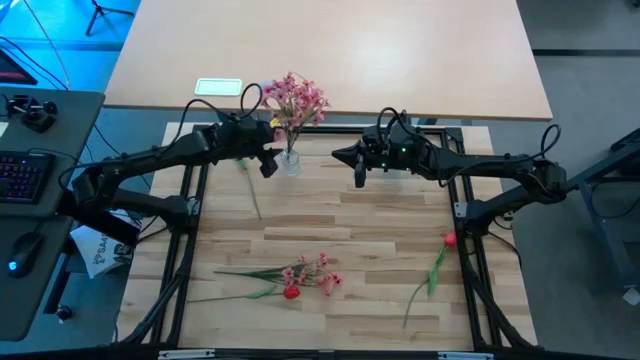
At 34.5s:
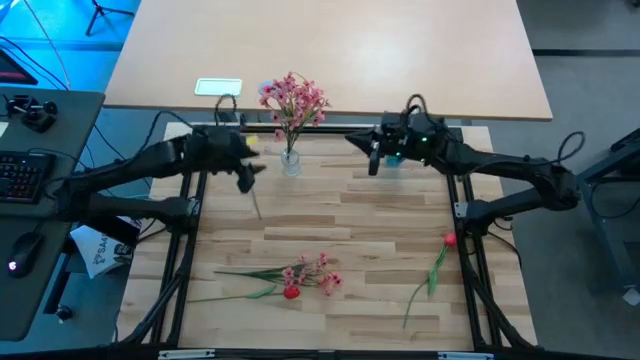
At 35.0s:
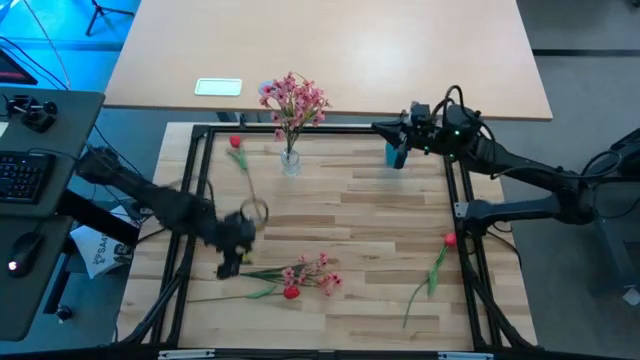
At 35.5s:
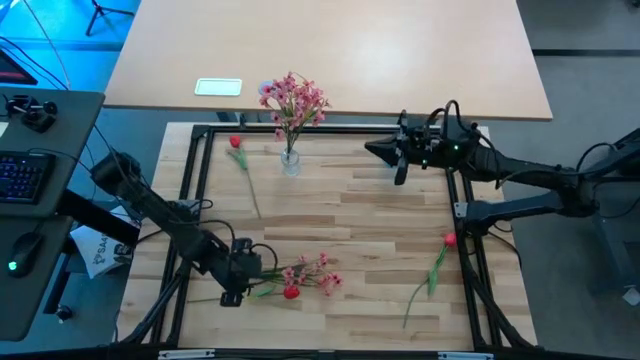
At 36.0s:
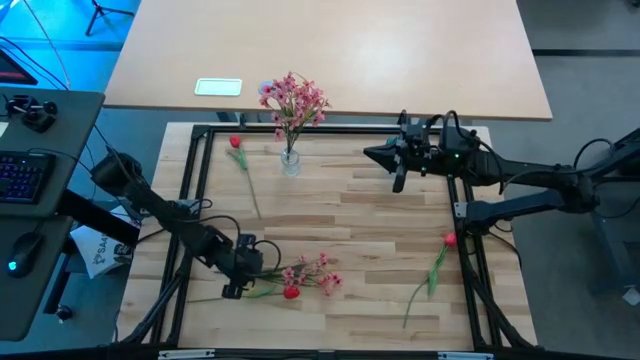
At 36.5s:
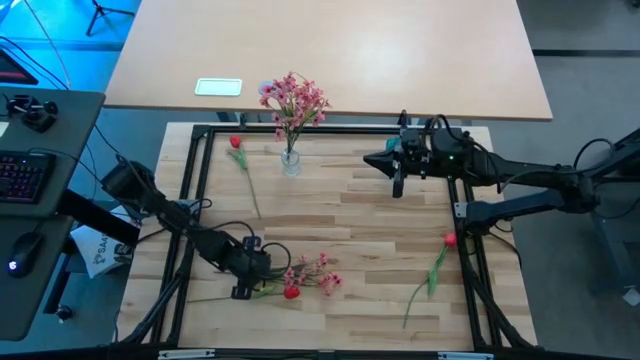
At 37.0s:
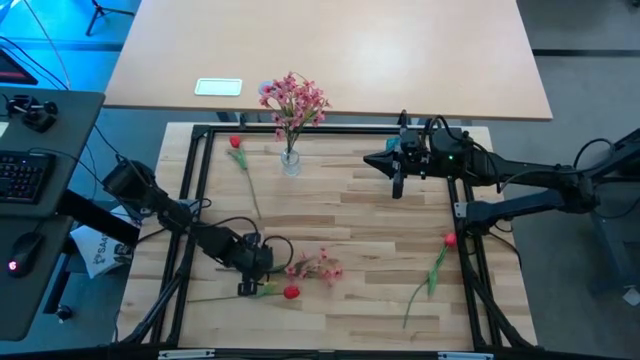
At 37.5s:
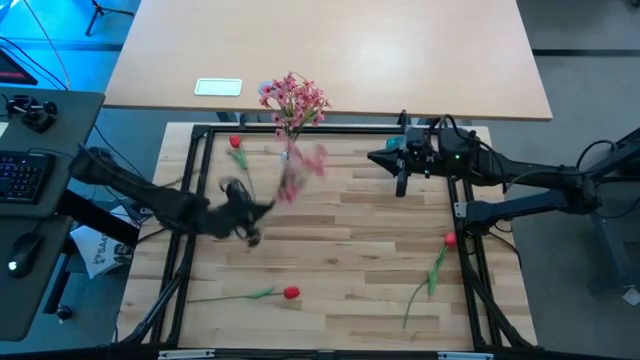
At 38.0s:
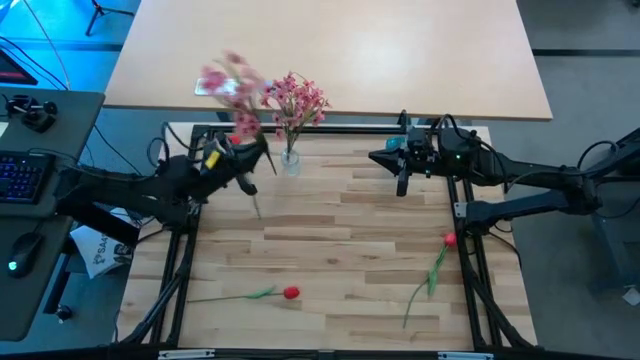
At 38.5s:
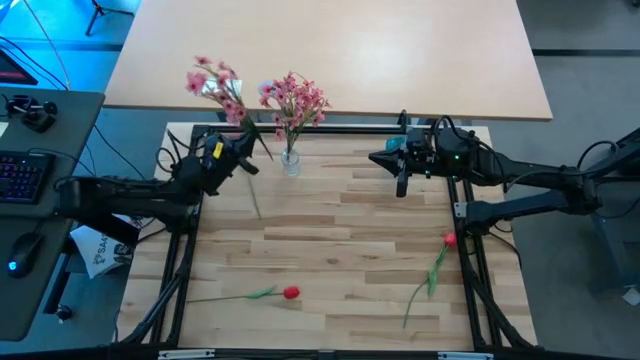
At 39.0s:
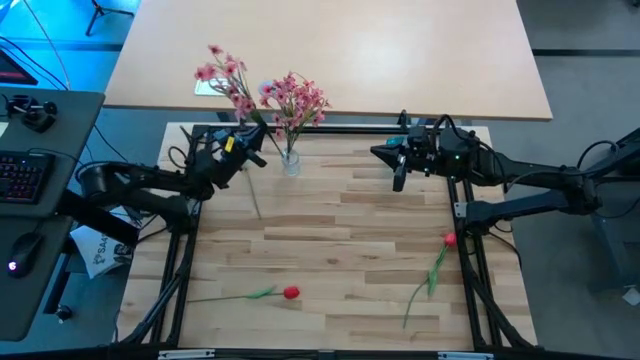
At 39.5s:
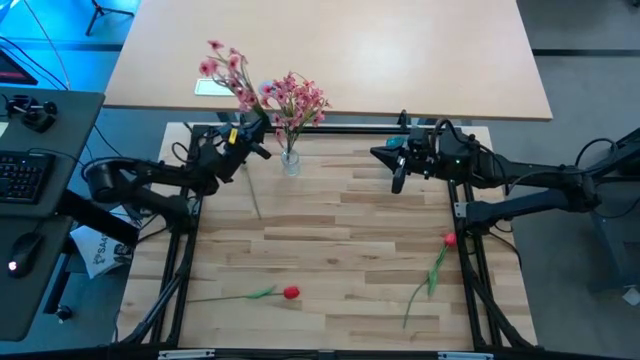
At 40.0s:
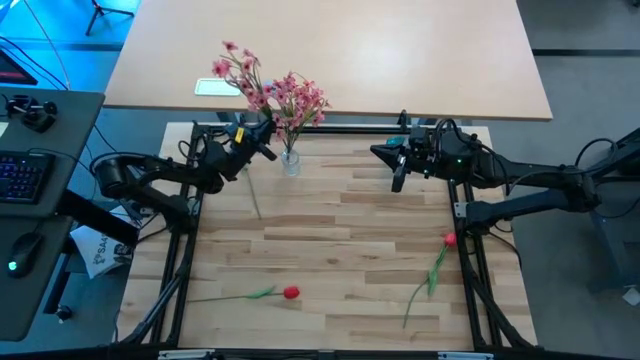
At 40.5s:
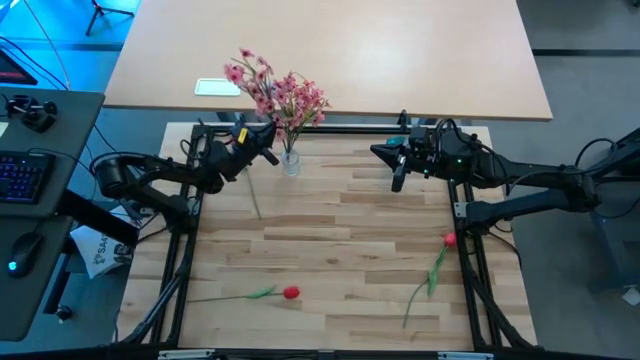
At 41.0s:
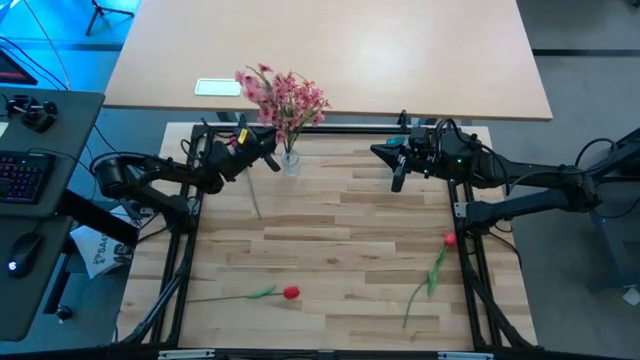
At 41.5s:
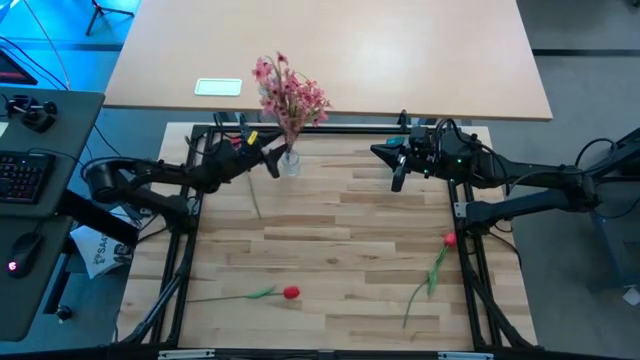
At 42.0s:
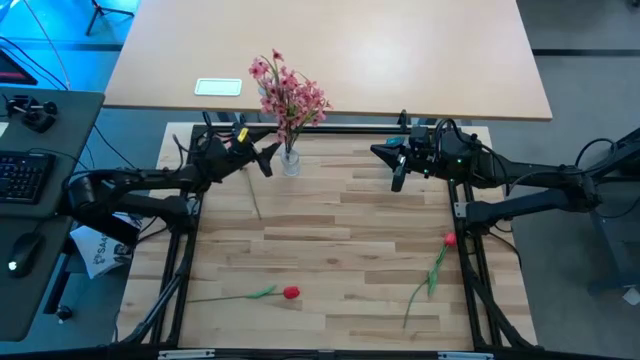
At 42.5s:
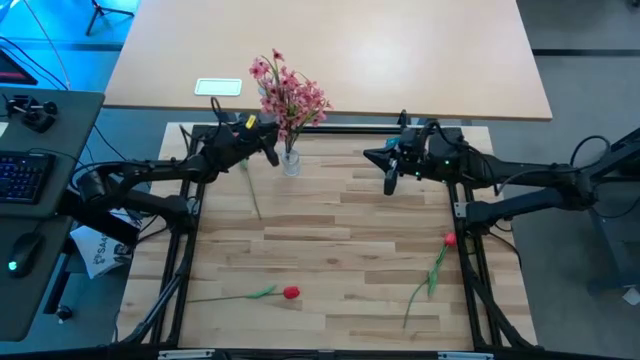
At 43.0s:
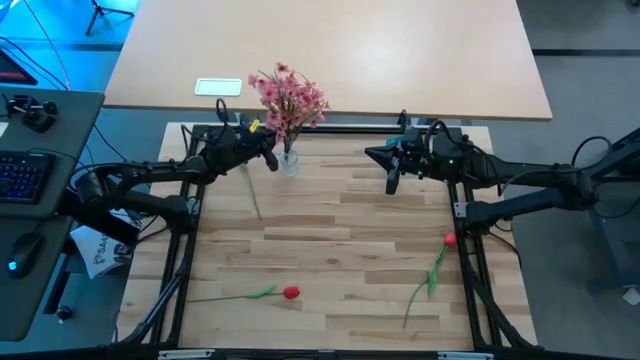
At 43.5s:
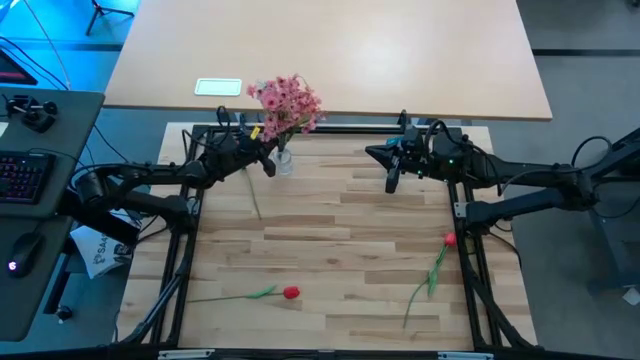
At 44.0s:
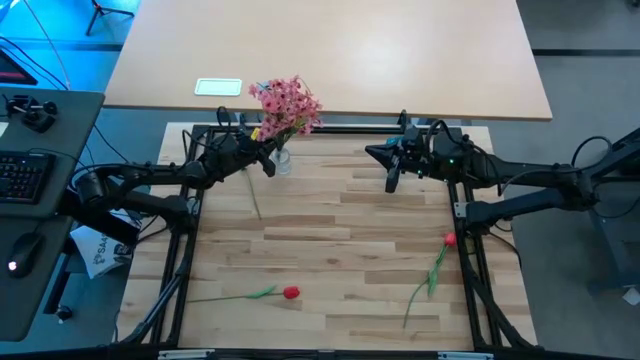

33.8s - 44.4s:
Task: Sort flowers into vase by color
Put the pink flower into the transparent vase

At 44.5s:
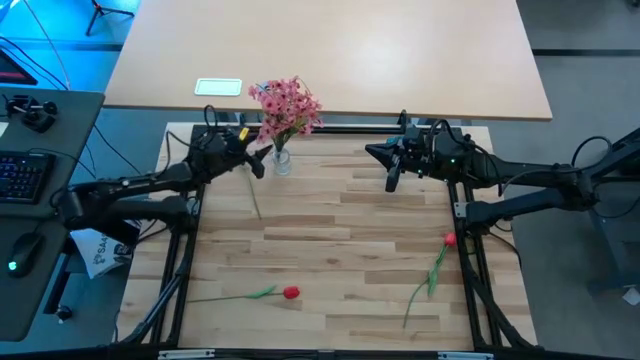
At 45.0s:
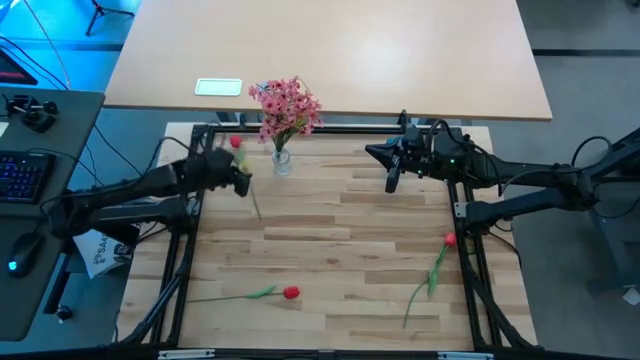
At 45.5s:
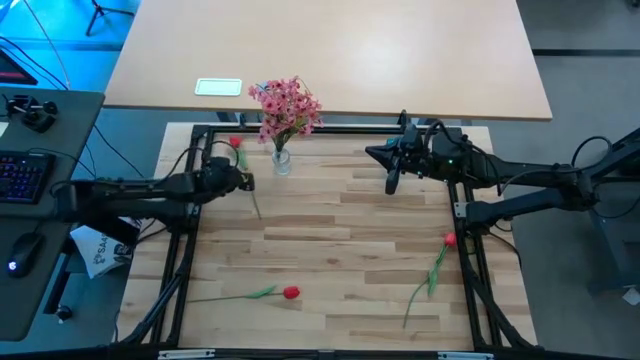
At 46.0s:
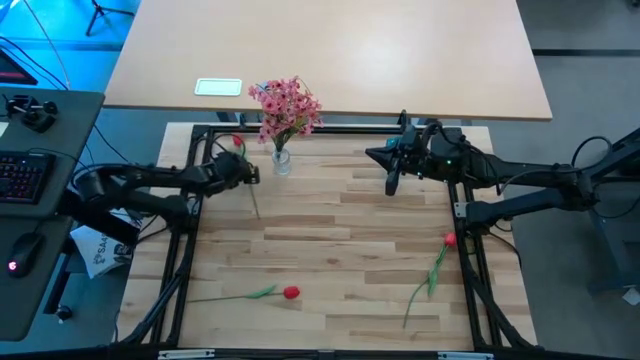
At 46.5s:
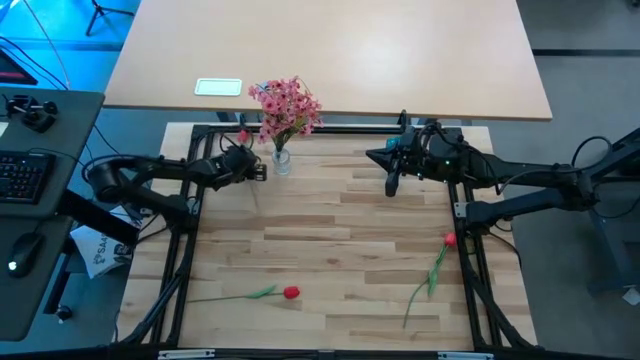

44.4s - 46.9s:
Put the top red tulip into the blue vase

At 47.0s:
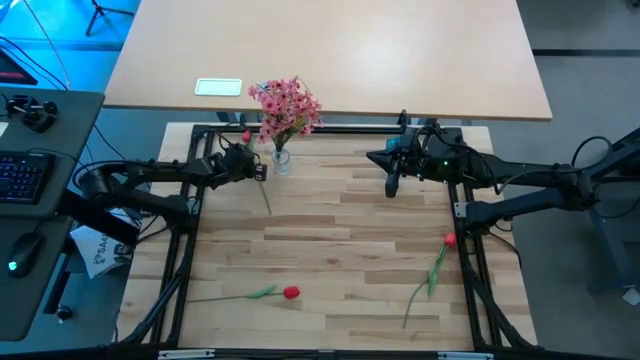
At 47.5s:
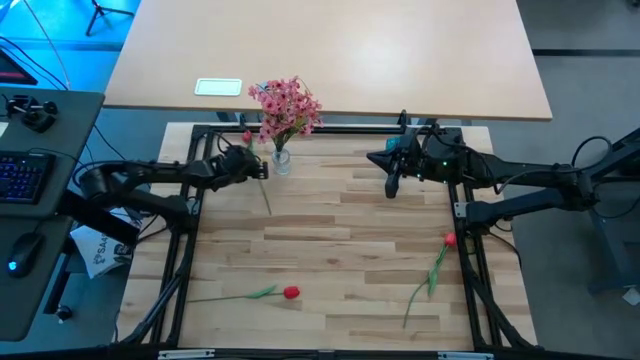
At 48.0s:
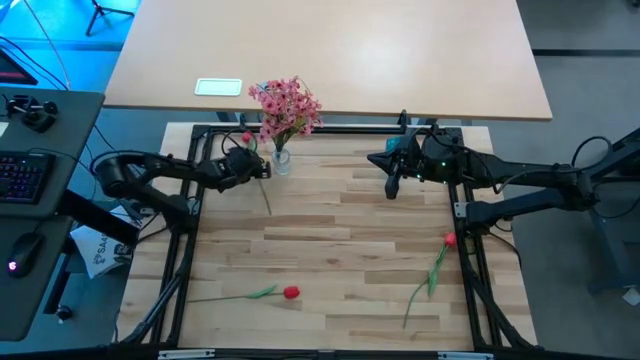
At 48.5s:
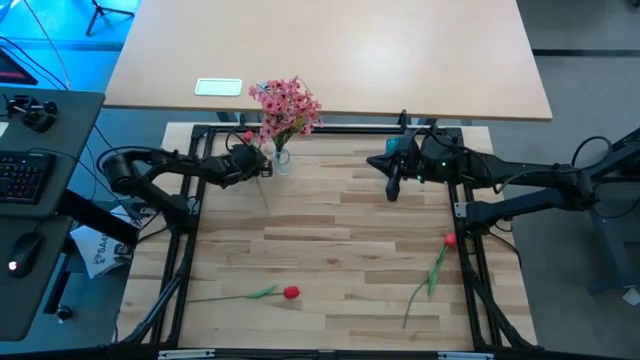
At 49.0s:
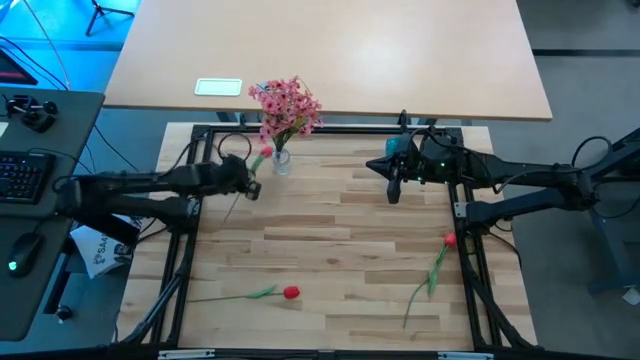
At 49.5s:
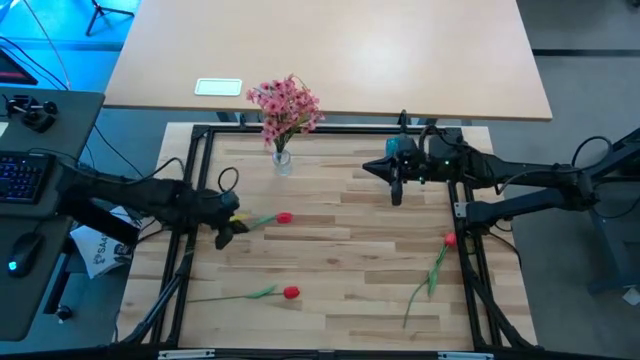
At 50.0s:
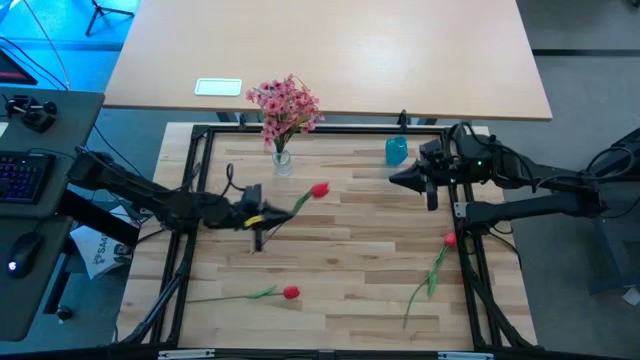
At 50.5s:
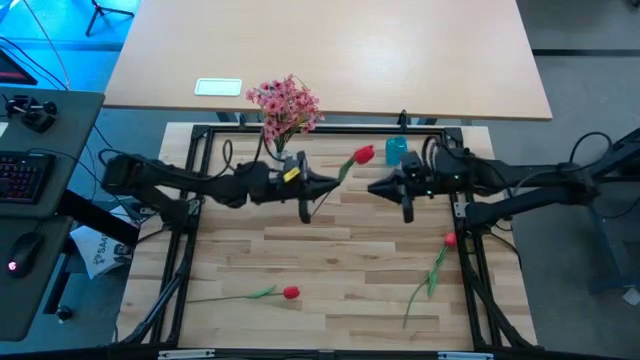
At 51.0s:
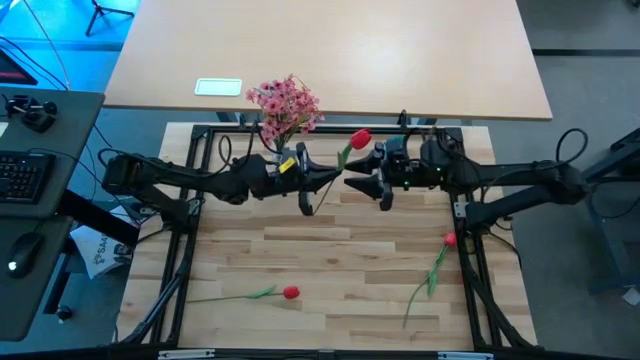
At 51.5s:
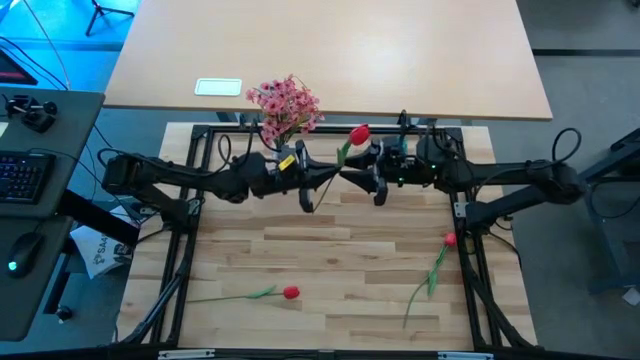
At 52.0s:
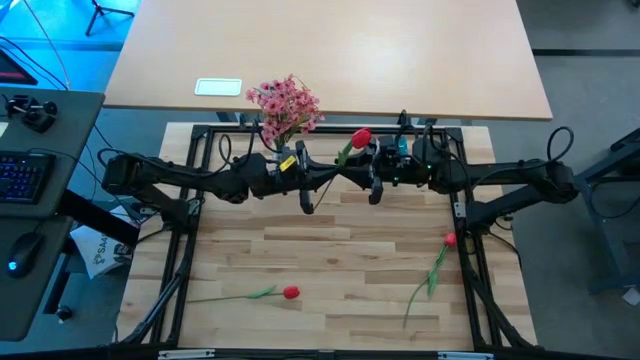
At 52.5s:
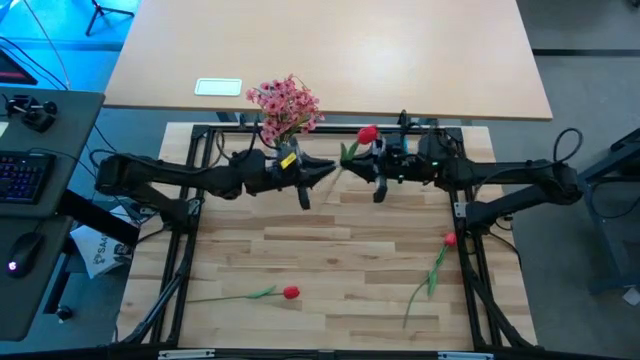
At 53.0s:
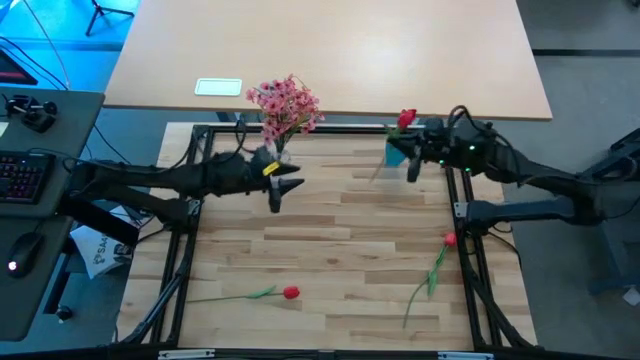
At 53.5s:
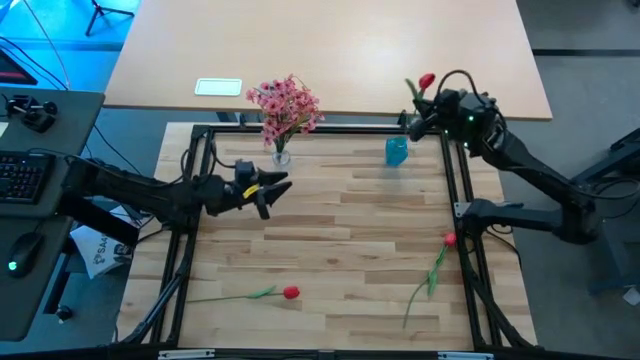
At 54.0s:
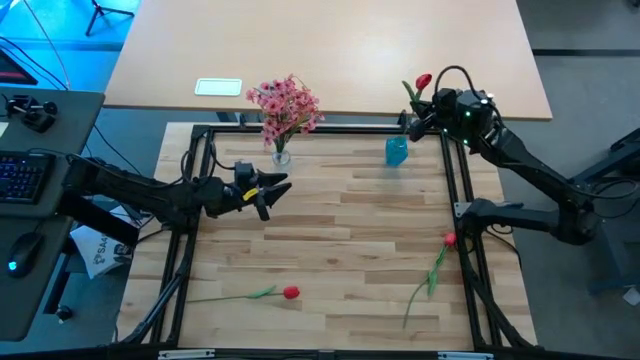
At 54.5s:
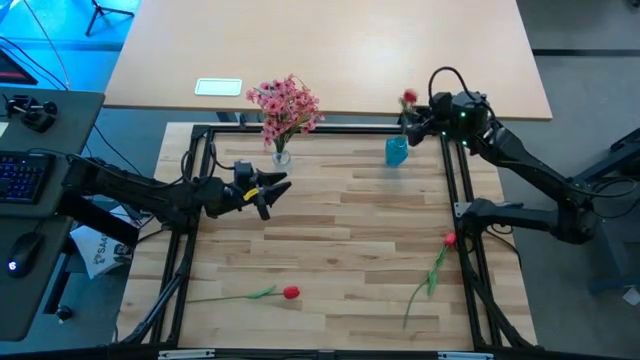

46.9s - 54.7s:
Put the top red tulip into the blue vase
